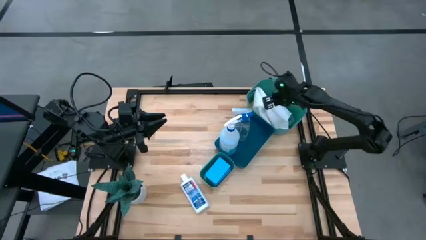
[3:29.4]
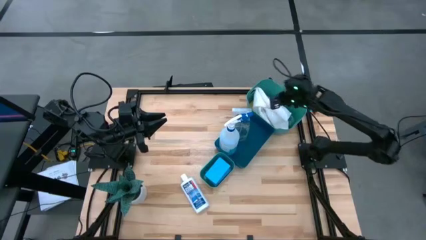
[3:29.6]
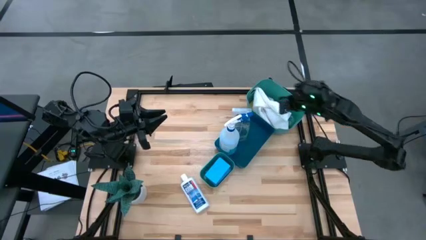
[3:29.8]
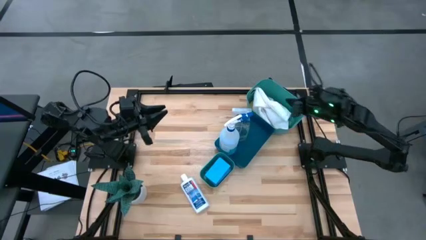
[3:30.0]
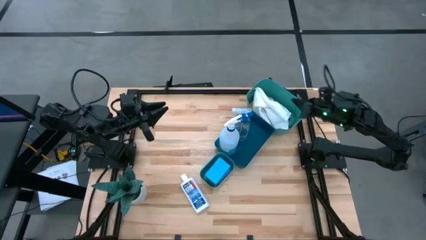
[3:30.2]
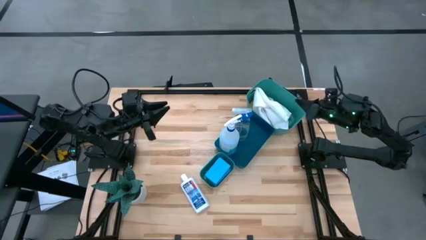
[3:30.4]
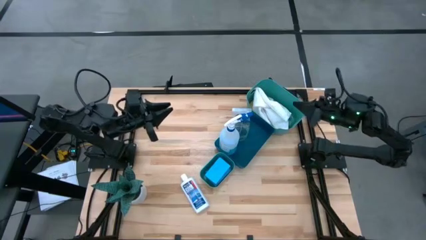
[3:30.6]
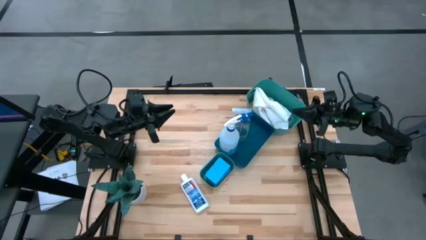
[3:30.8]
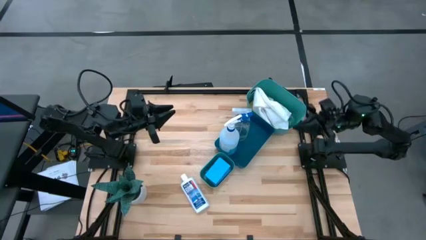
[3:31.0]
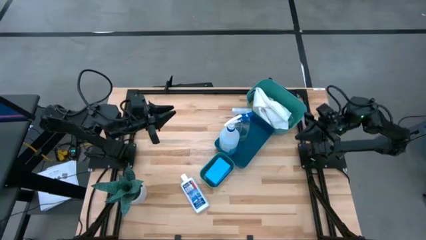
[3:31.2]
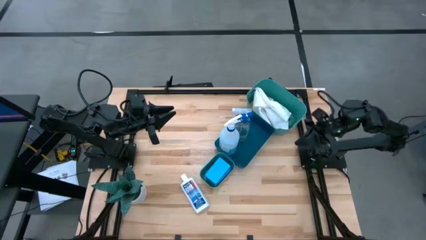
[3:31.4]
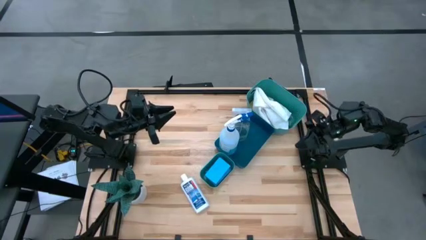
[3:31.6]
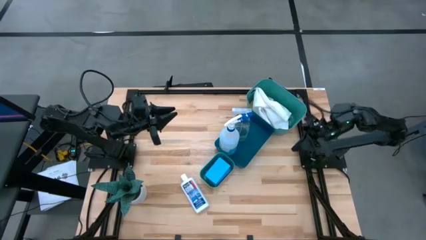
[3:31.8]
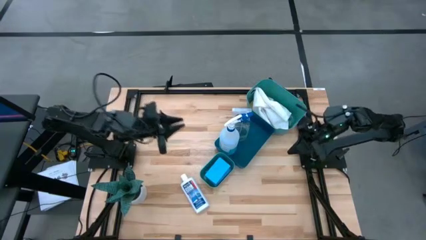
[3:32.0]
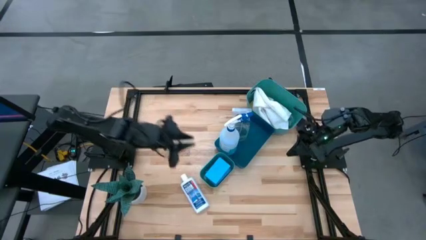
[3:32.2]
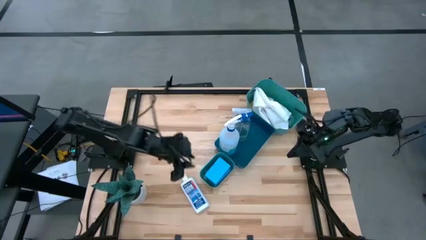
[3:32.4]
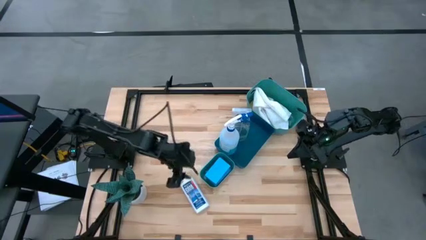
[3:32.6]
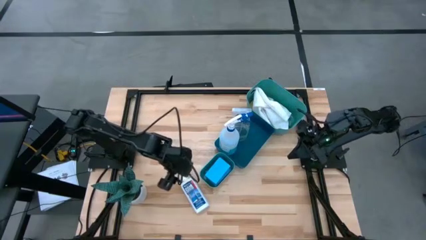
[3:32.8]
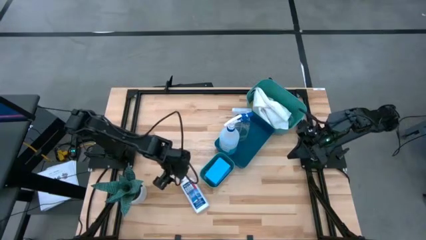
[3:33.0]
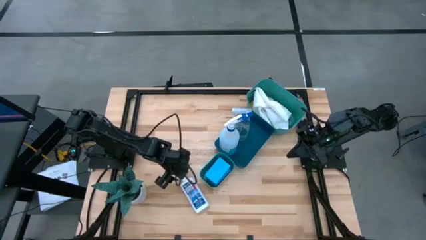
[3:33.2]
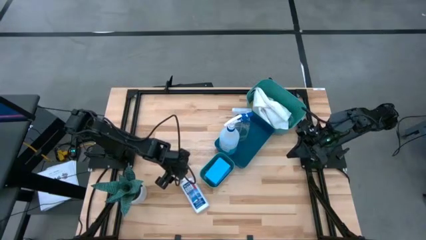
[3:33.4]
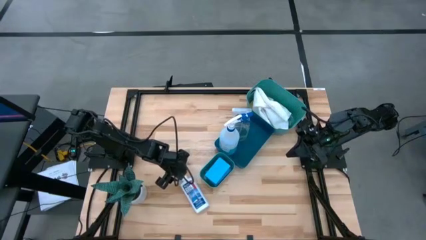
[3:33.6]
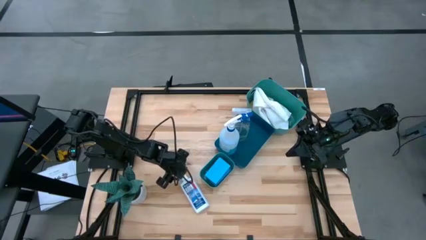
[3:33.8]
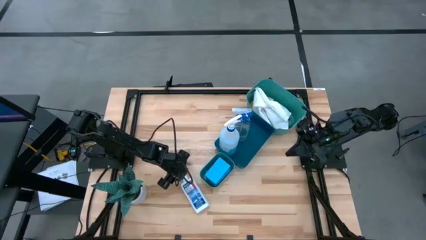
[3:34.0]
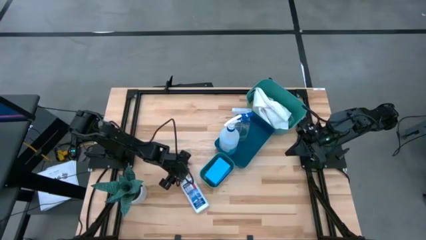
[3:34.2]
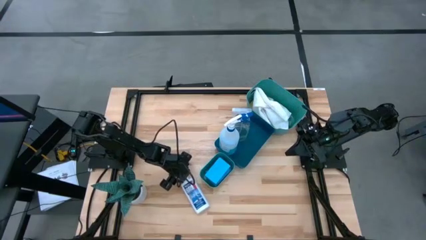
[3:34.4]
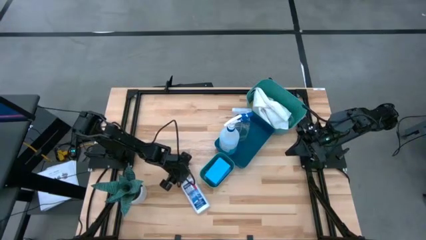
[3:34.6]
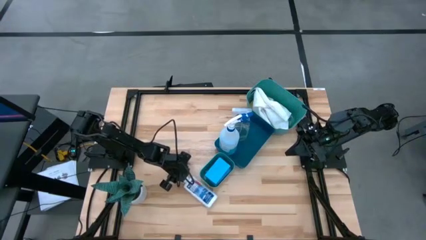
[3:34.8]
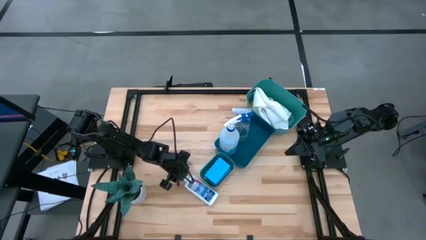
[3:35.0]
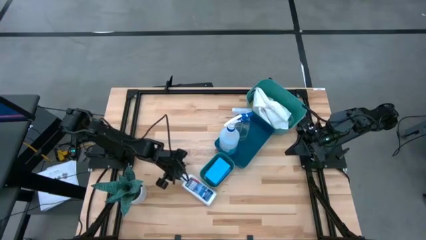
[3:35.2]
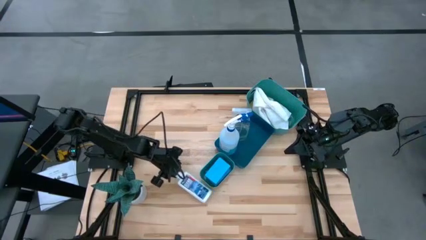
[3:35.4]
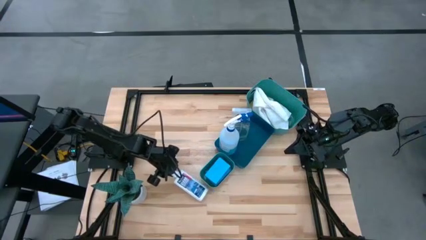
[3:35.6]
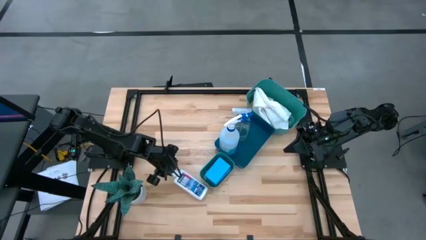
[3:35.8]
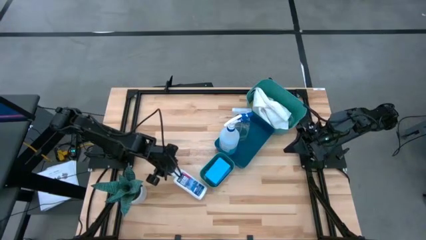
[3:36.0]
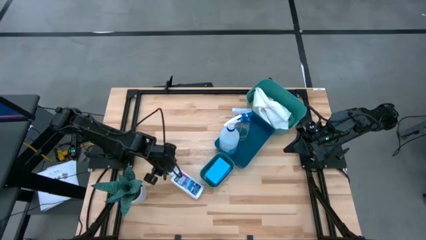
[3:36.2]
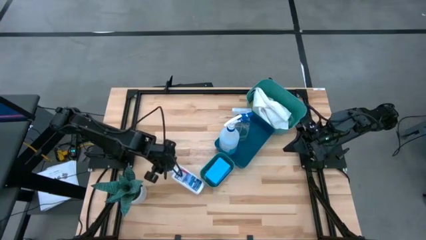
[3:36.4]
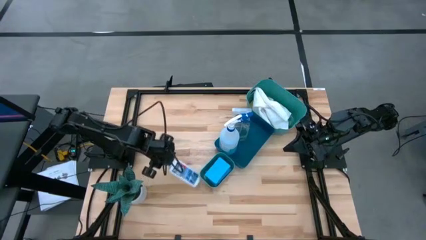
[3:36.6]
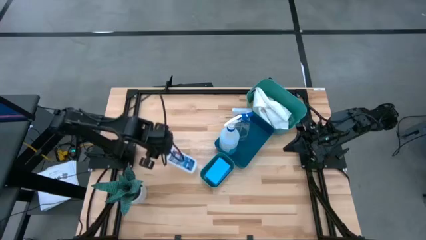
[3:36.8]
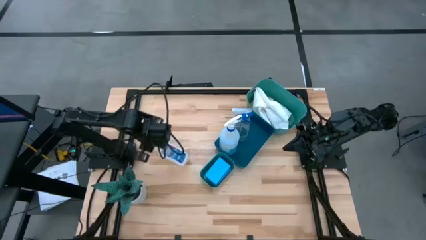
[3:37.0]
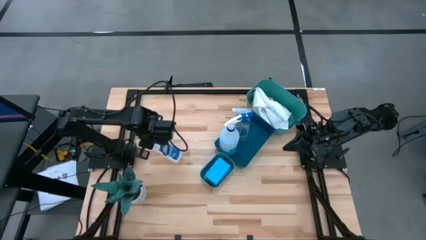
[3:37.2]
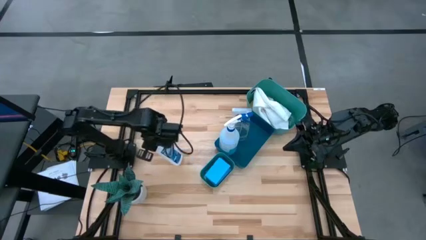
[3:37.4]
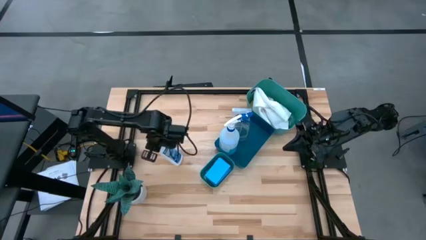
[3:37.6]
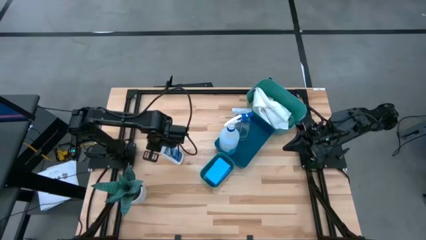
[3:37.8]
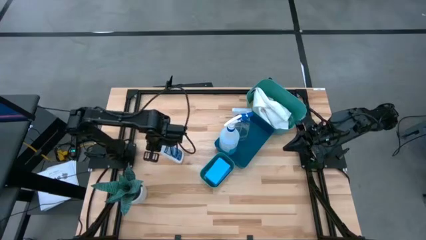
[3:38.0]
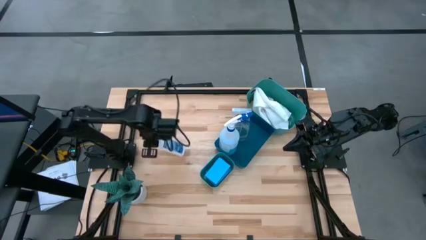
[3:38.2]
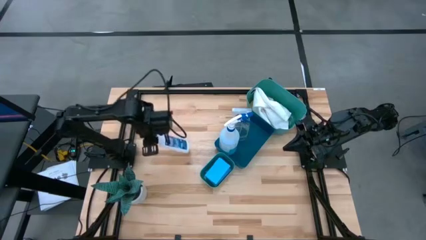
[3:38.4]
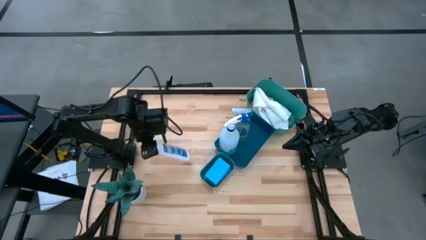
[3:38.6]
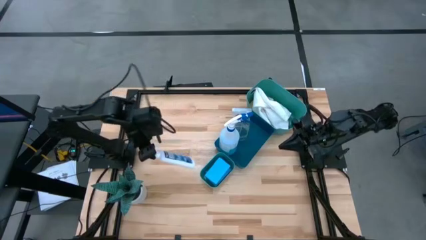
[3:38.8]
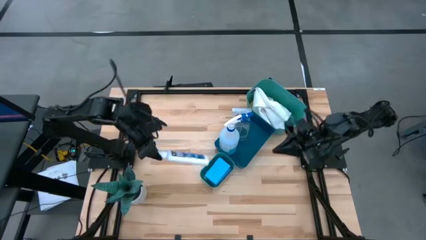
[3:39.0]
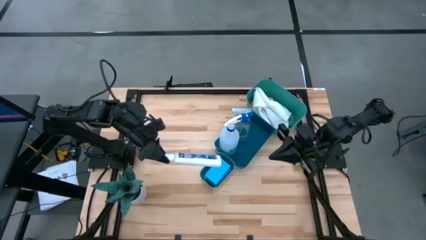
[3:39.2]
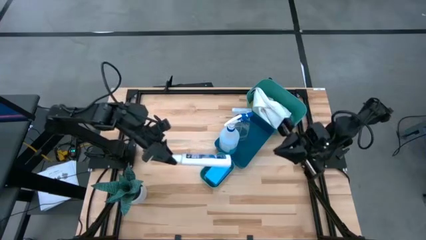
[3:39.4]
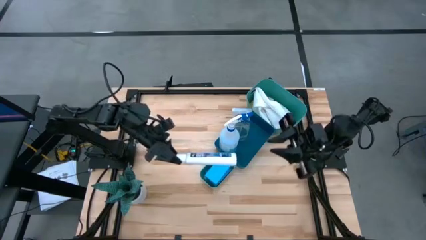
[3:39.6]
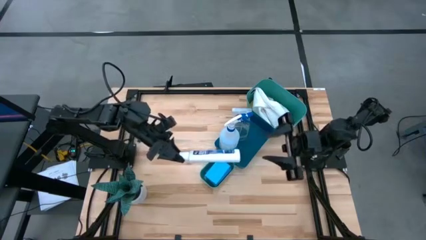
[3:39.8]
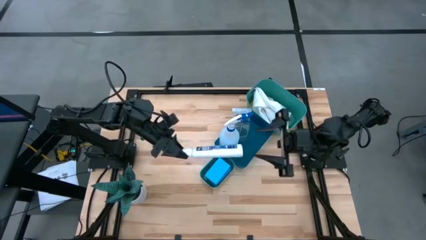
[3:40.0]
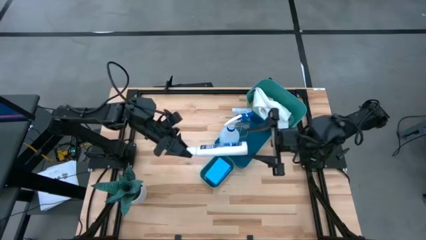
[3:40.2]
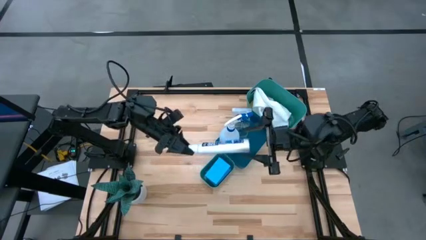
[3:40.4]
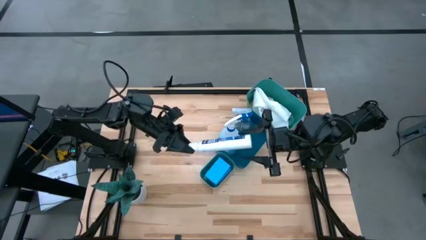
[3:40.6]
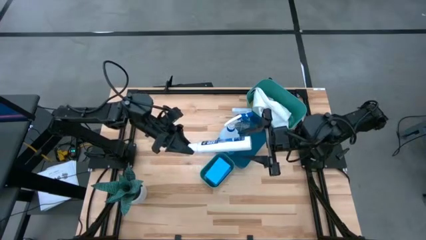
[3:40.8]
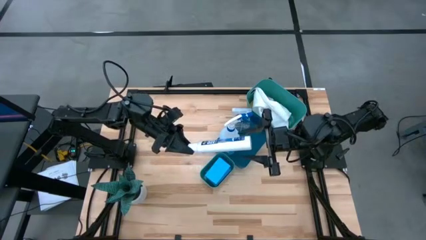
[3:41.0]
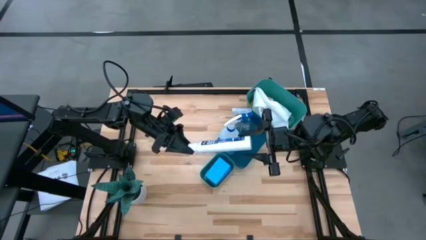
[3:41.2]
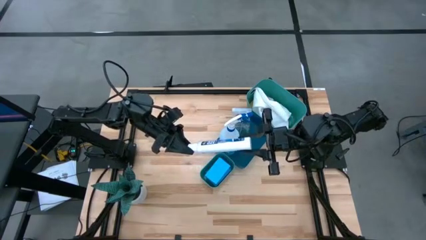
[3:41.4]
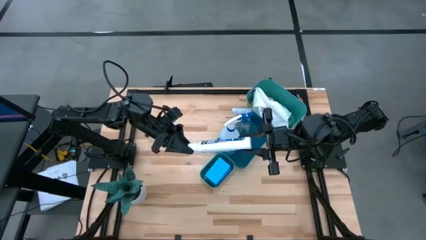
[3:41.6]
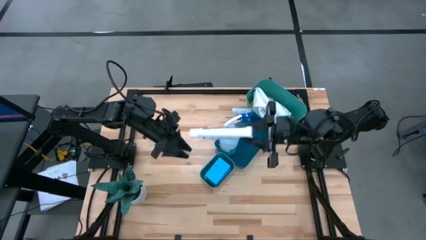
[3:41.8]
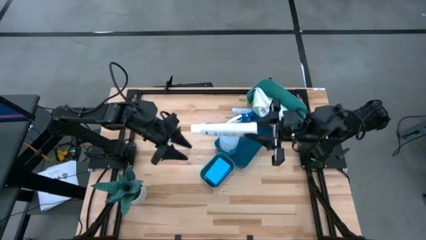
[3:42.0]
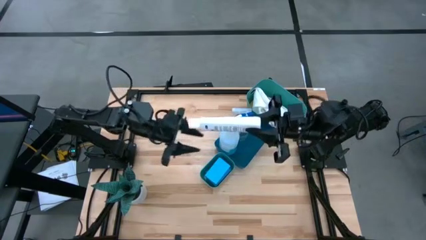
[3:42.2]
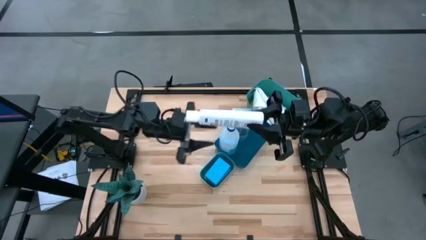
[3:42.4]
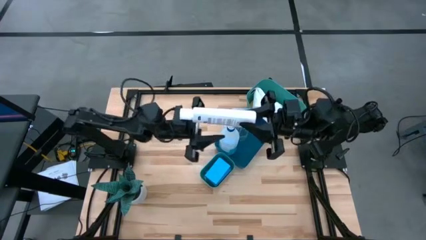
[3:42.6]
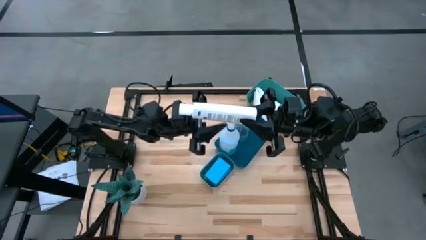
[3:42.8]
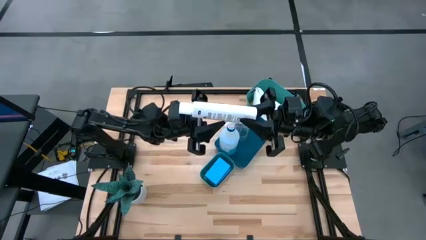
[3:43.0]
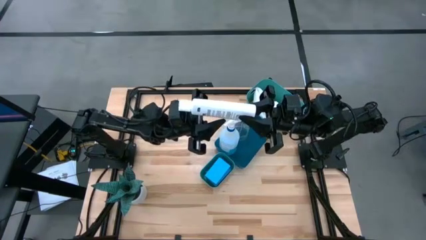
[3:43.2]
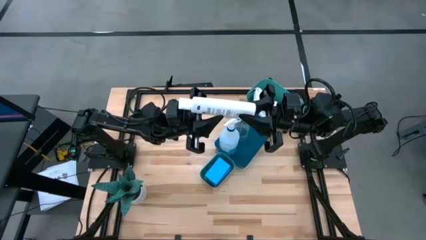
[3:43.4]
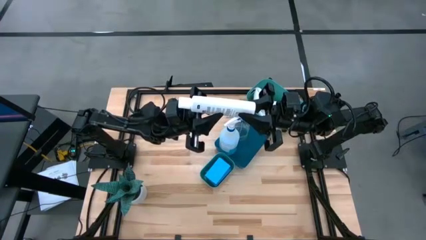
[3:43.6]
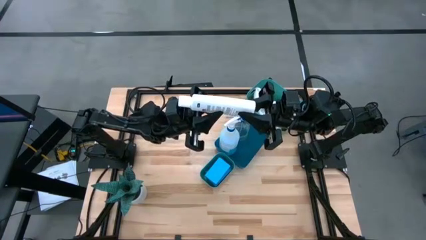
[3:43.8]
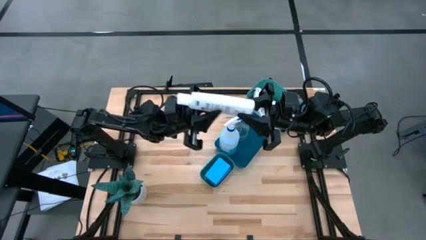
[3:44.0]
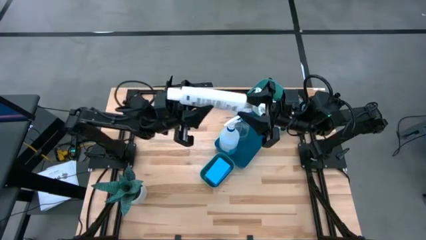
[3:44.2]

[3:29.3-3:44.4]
Task: Pick & Place Kitchen Items
Put the white plastic restorer bottle into the large blue bin
